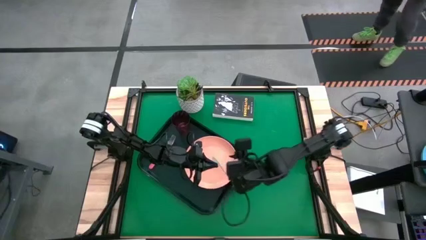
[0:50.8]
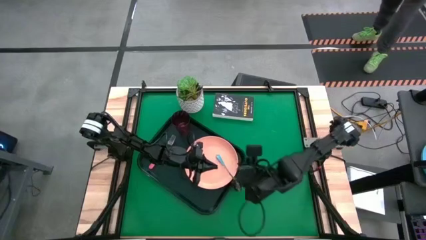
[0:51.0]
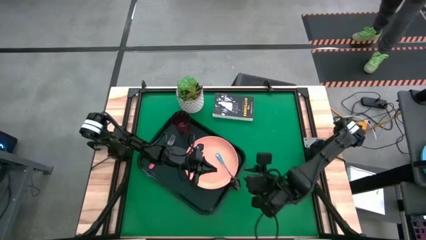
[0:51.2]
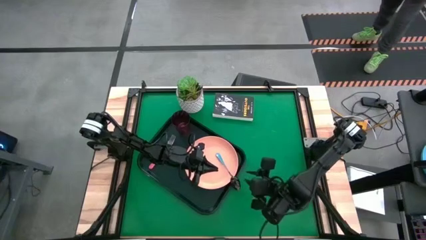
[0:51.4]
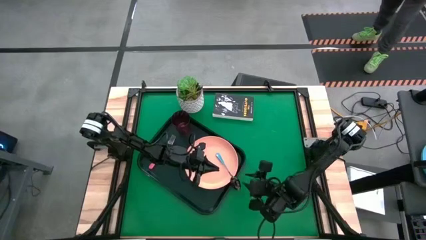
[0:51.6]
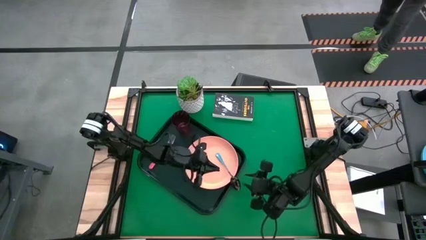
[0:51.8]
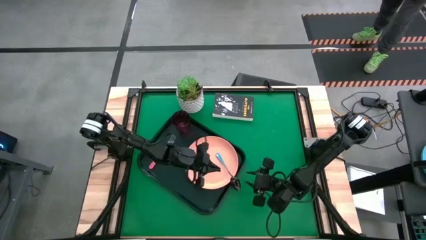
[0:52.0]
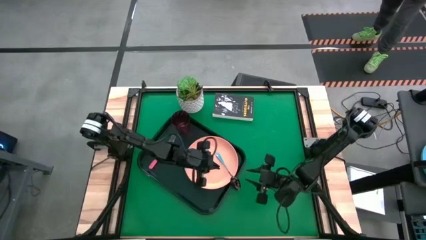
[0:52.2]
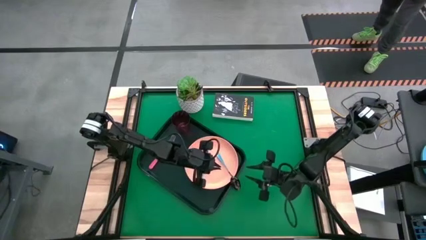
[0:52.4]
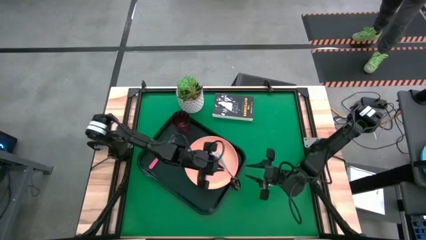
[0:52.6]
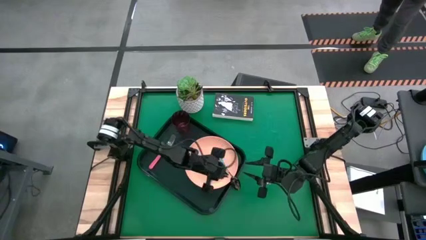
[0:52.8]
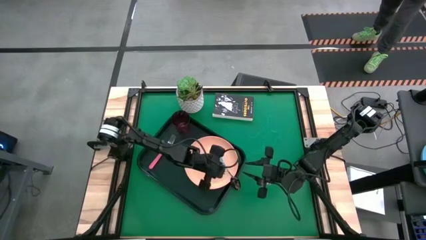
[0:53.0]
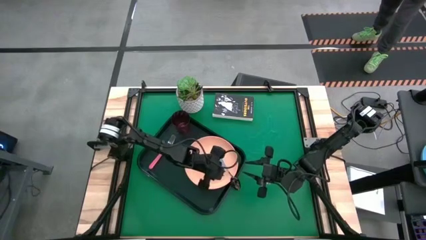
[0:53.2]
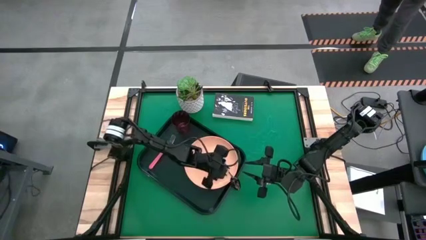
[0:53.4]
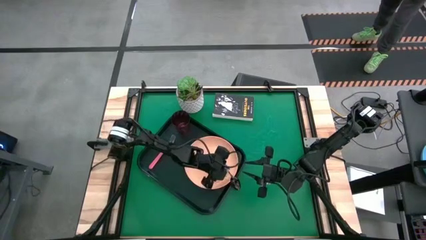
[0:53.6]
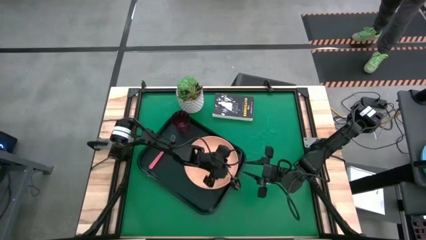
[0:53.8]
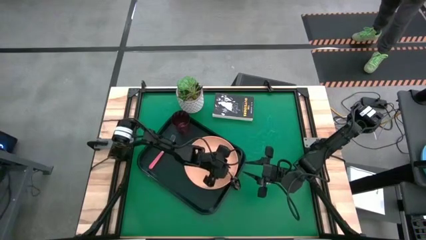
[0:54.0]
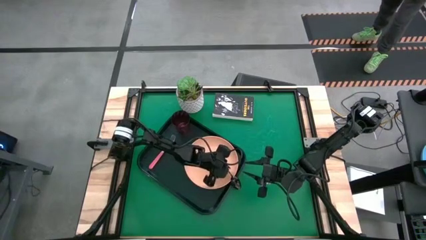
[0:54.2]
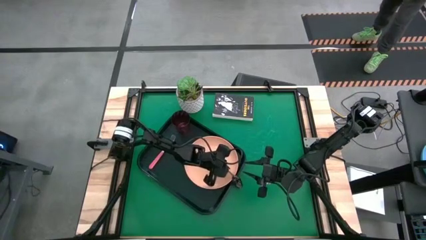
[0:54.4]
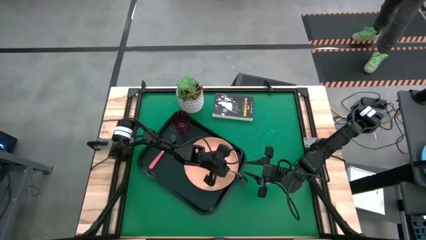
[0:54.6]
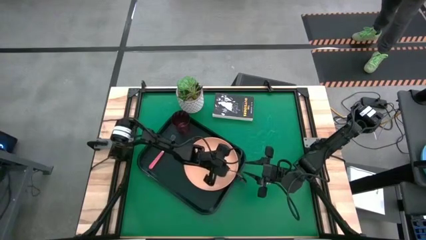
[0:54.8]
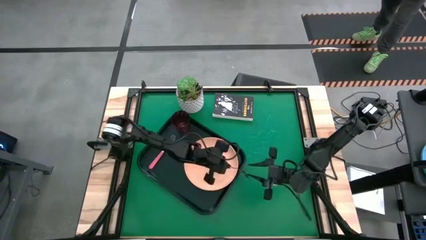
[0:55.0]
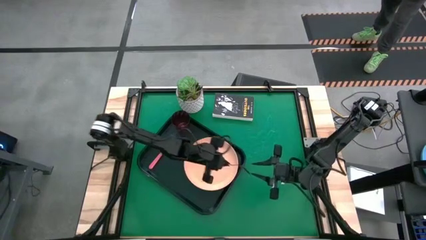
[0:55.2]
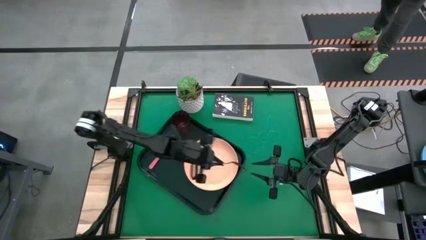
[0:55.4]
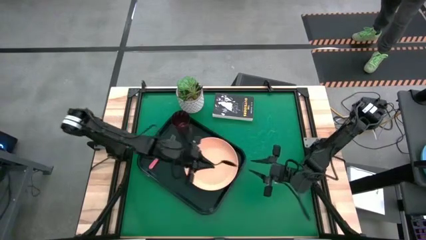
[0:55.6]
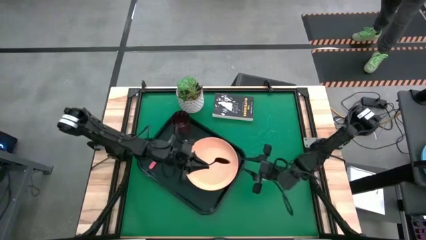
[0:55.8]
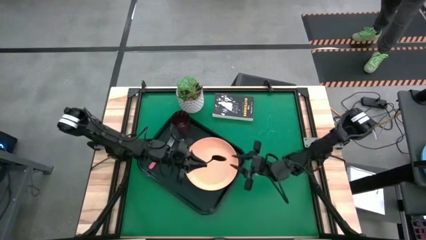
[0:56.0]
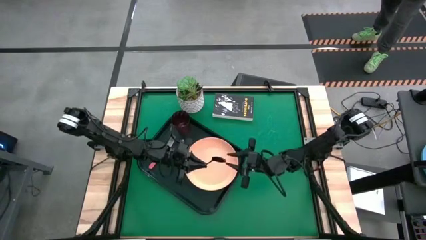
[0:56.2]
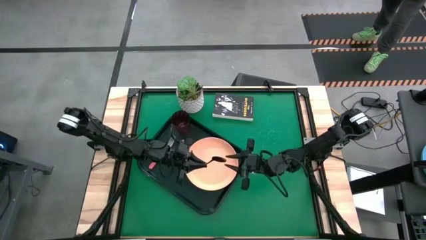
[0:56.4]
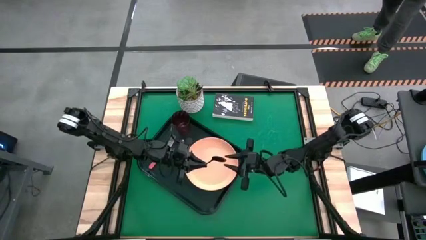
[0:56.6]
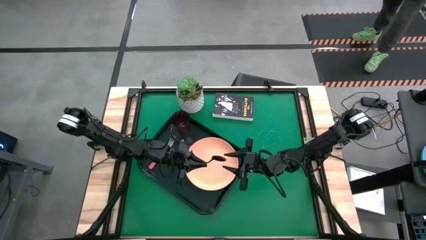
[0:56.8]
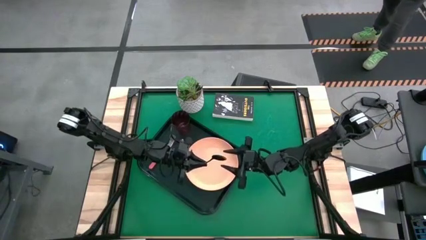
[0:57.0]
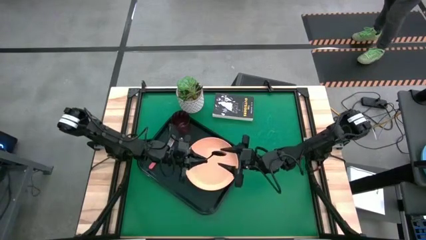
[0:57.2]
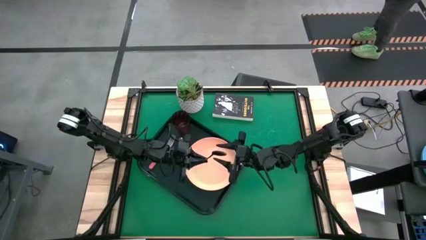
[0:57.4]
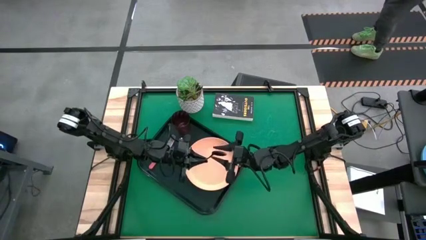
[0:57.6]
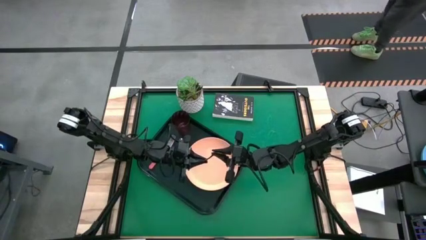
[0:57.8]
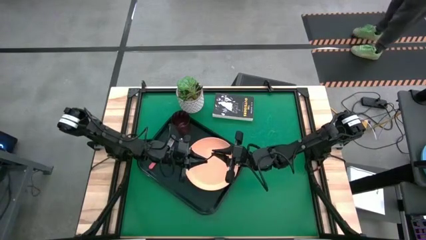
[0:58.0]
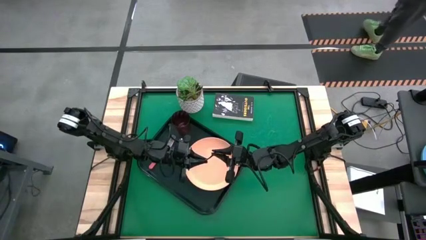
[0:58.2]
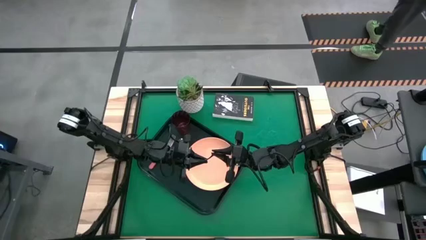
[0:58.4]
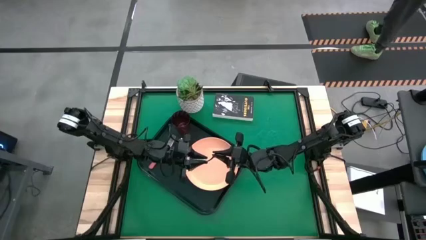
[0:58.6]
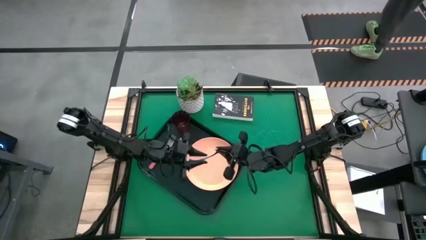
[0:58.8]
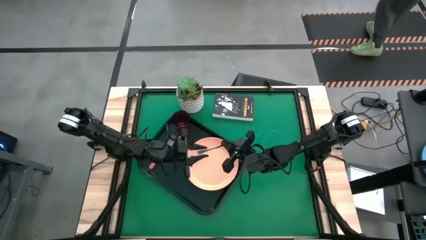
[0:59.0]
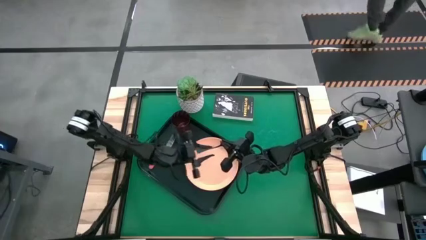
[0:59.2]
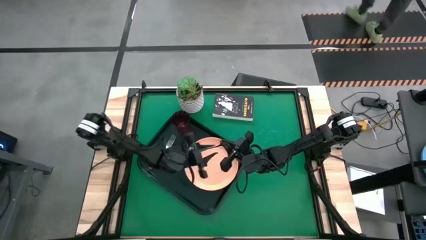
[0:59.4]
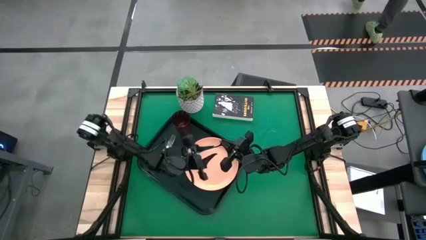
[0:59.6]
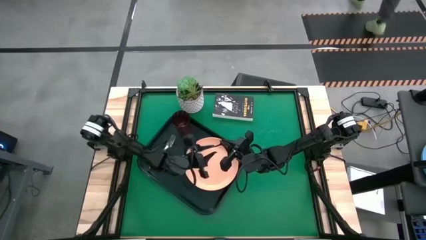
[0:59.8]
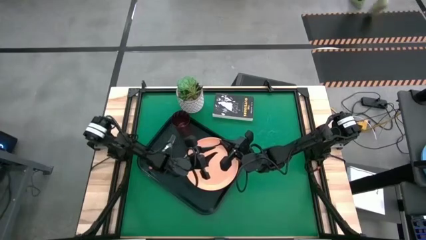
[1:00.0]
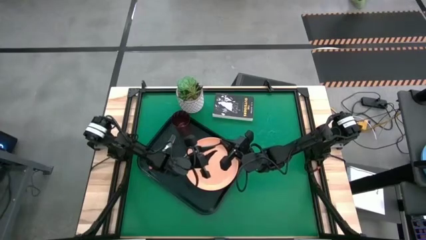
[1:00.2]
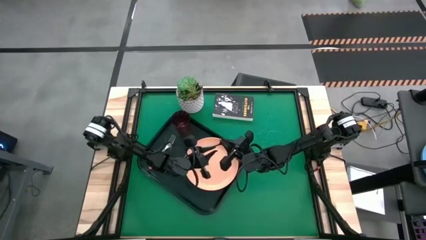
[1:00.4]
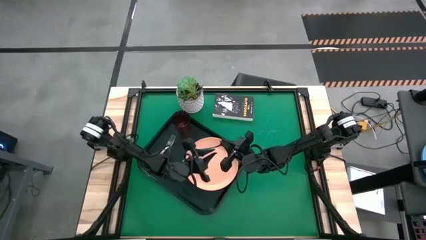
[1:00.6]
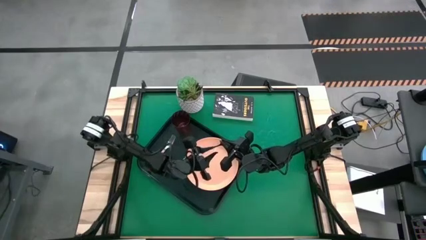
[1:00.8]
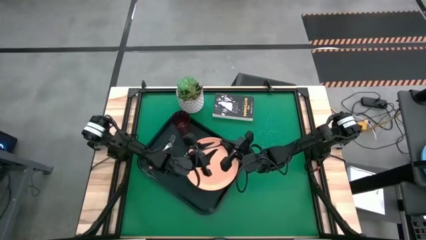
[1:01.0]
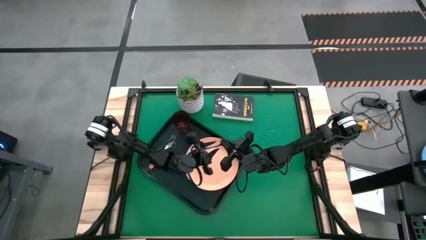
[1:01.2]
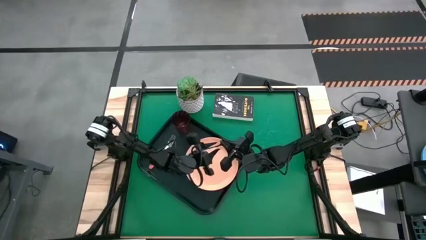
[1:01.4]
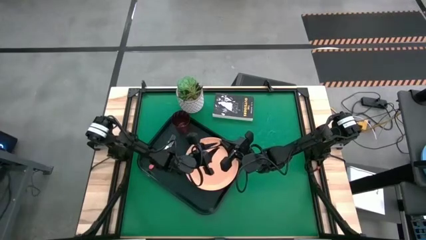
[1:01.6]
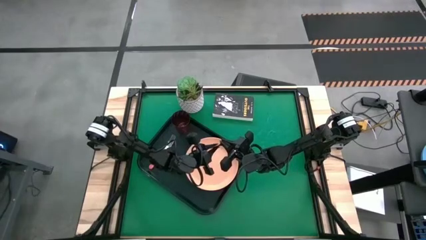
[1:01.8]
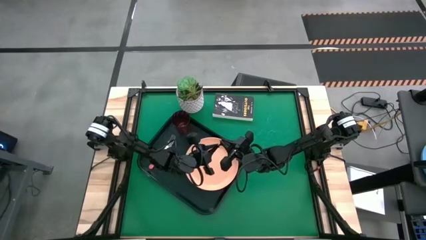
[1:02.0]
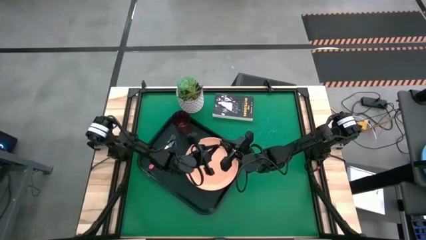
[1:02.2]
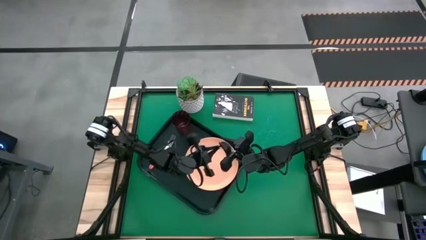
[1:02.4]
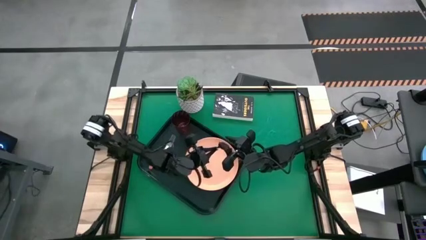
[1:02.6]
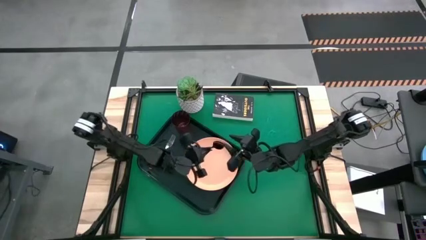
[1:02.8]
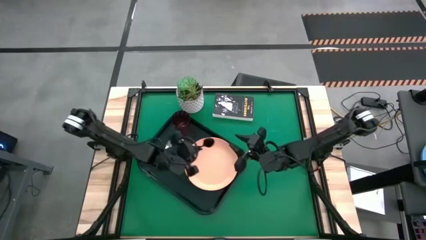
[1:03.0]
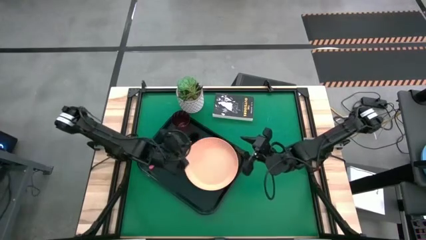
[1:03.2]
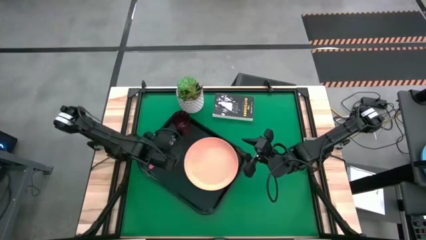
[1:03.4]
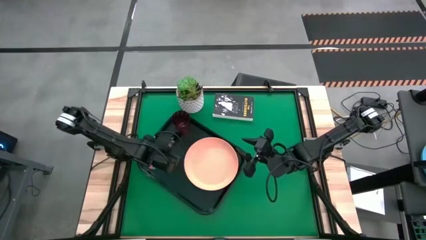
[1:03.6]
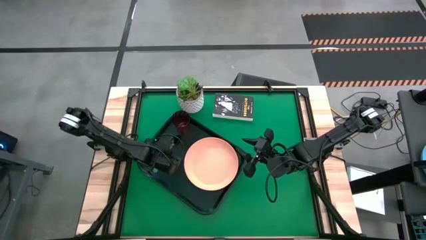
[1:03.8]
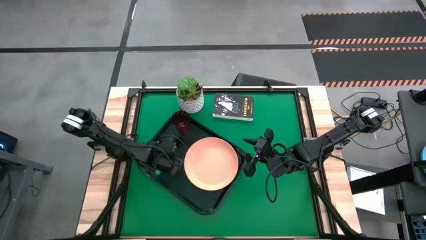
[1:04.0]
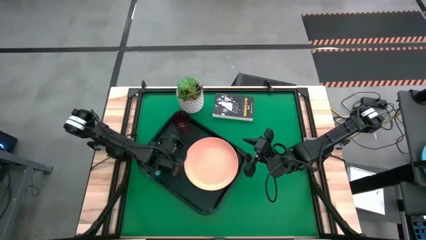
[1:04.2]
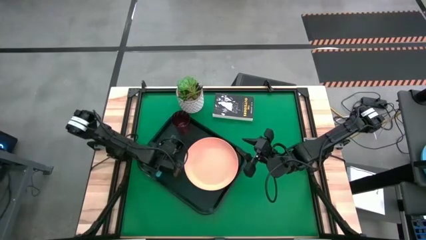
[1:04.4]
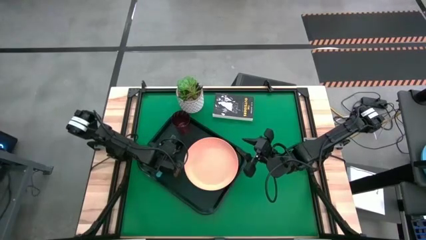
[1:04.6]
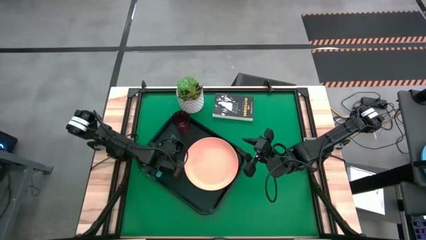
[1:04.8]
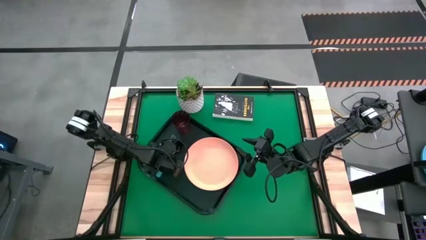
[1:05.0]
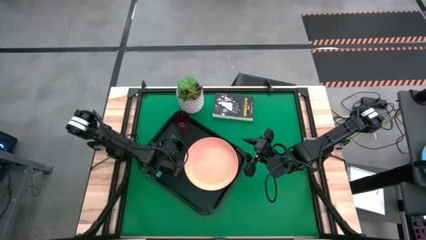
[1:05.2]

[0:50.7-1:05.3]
Task: Pick and place plate/cup/fork/spoon on tray
Put the blue spoon on the black tray to the right of the pink fork

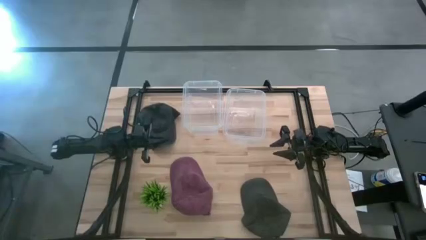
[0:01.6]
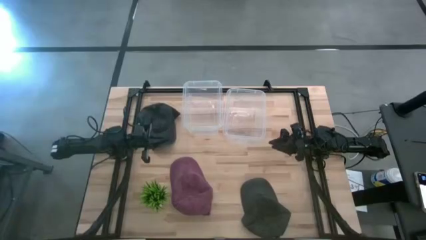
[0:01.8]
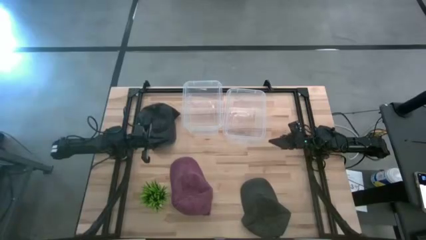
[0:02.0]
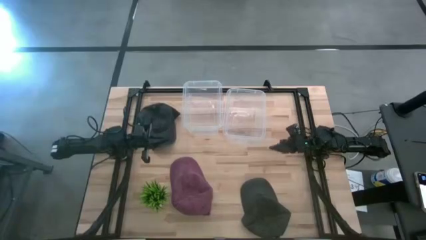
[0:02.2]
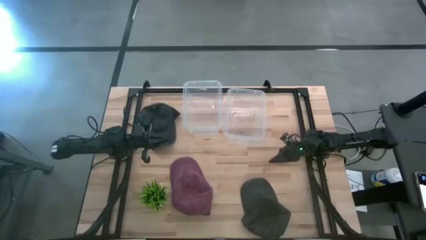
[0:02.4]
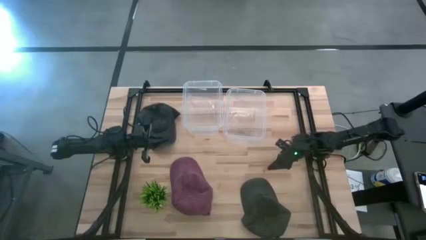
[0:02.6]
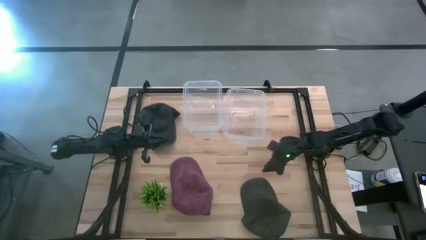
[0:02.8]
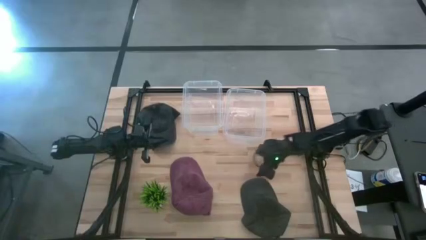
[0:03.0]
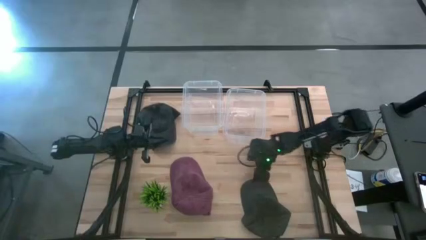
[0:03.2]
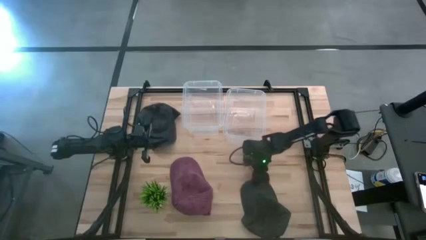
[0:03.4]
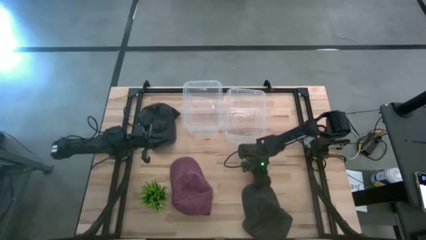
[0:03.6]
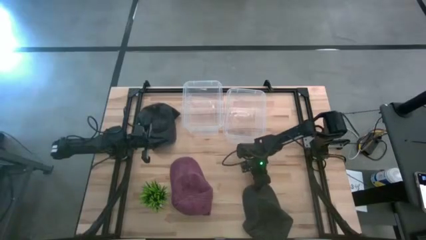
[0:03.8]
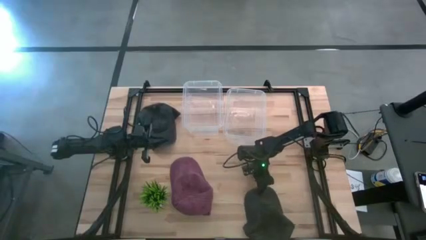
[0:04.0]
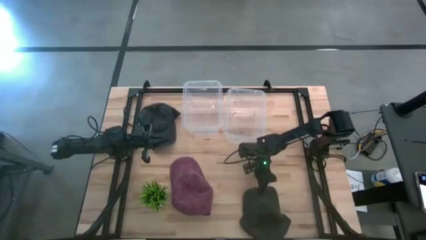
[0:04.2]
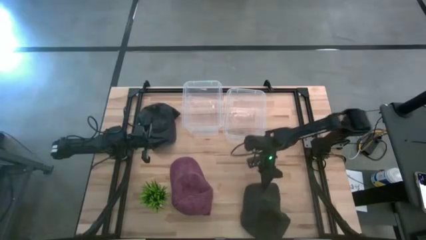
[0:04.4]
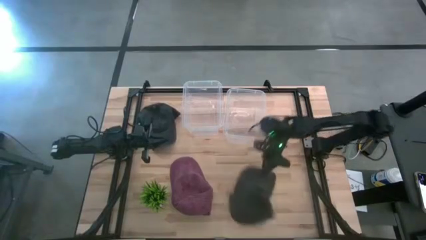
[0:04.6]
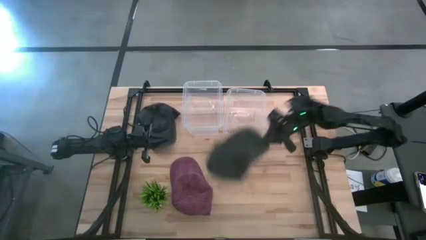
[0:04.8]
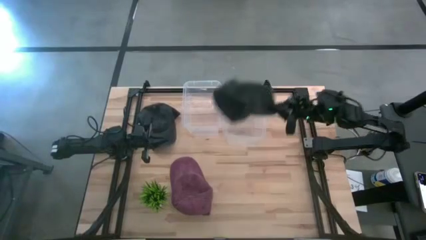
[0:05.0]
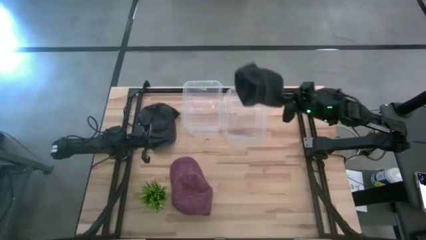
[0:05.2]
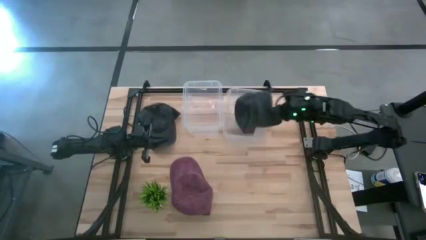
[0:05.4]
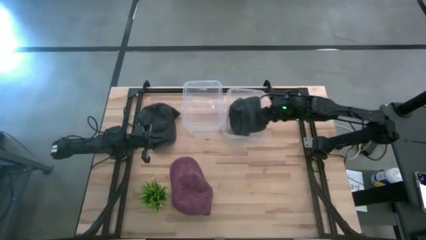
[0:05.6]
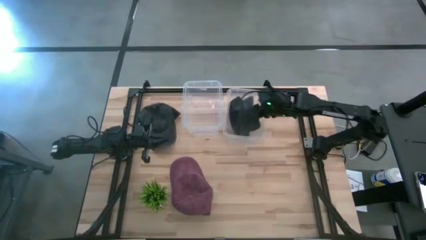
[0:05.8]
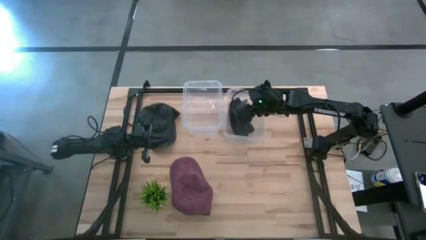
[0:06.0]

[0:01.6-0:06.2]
Task: Pick & Place hat
Put the bottom black cap into the right transparent bin
